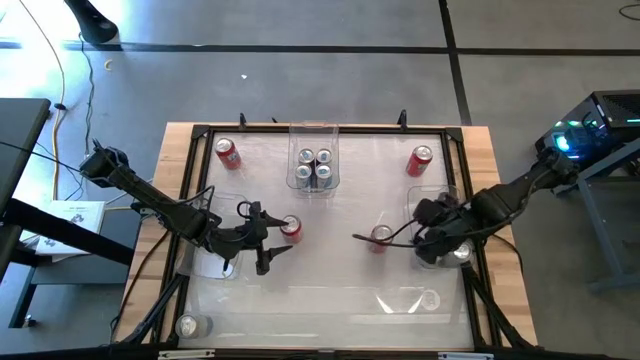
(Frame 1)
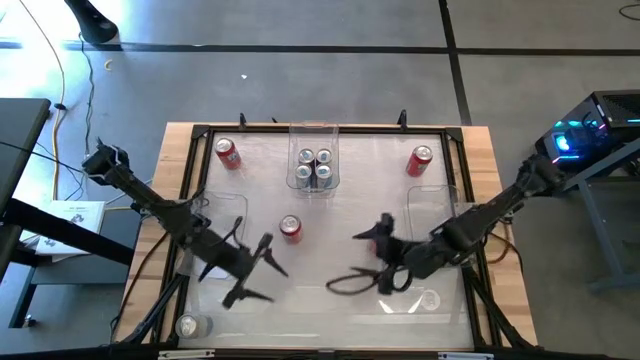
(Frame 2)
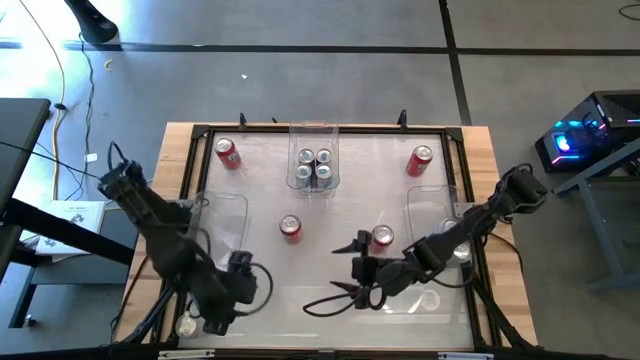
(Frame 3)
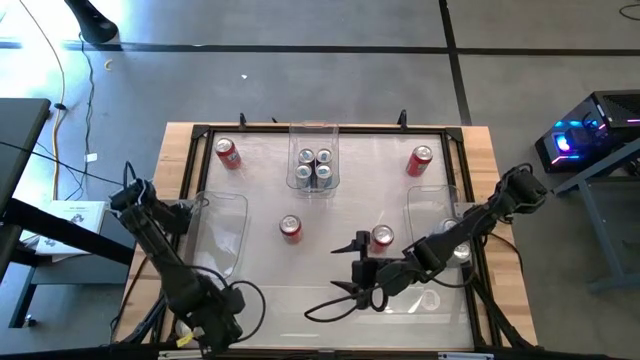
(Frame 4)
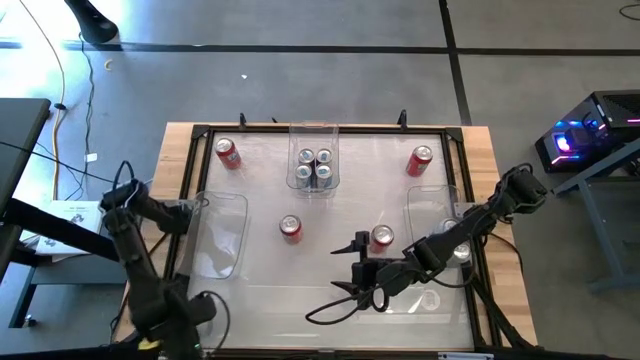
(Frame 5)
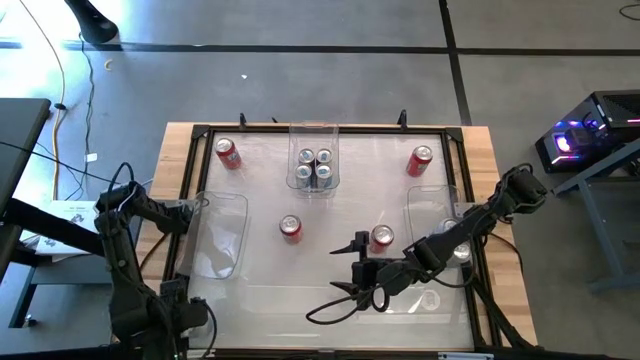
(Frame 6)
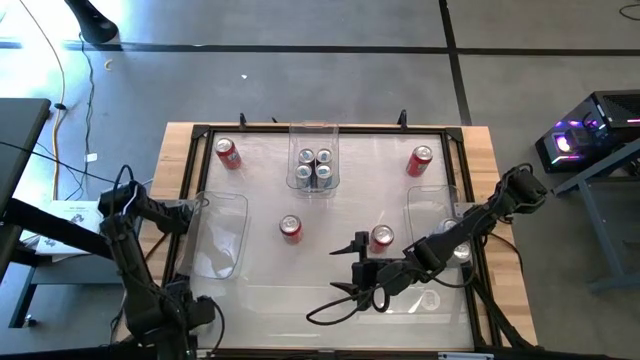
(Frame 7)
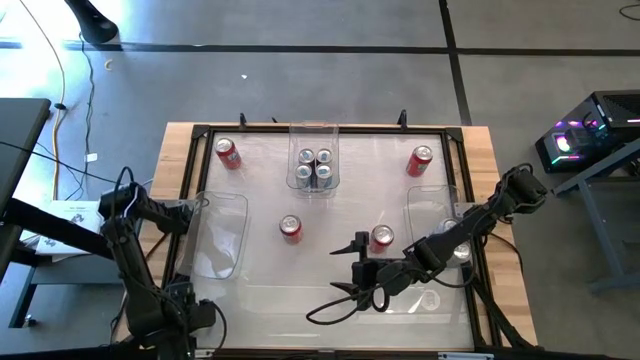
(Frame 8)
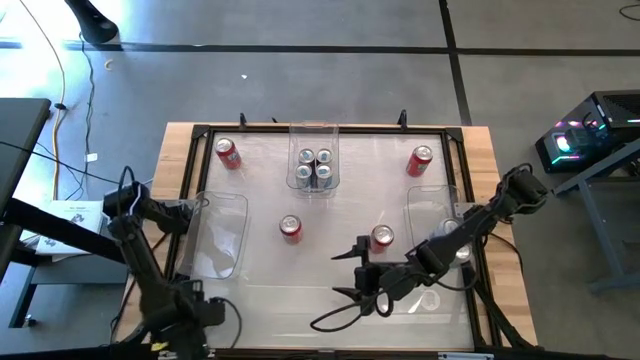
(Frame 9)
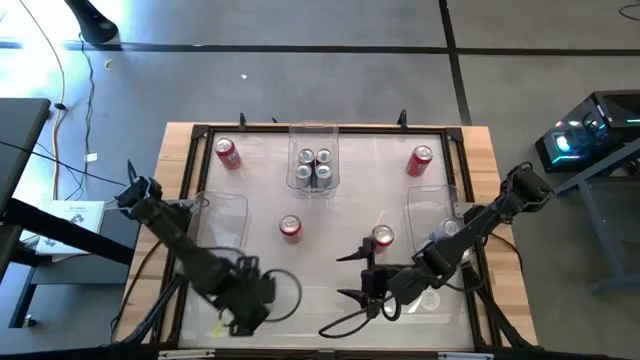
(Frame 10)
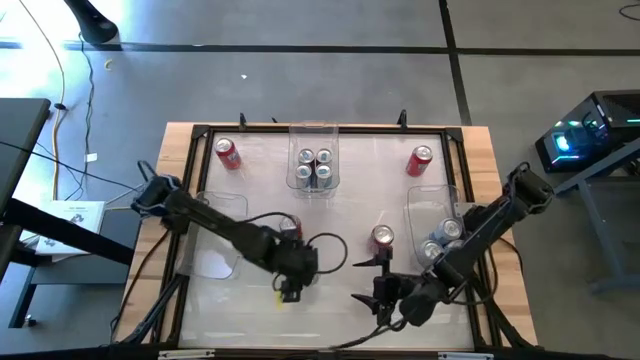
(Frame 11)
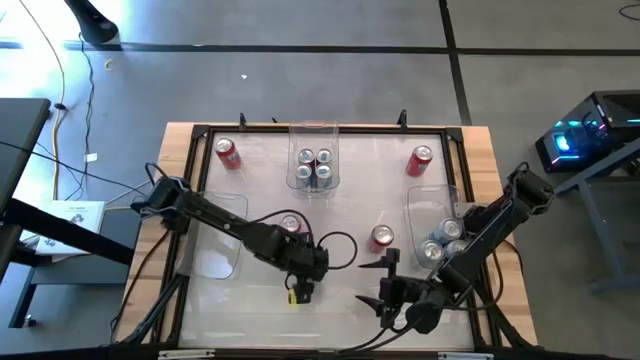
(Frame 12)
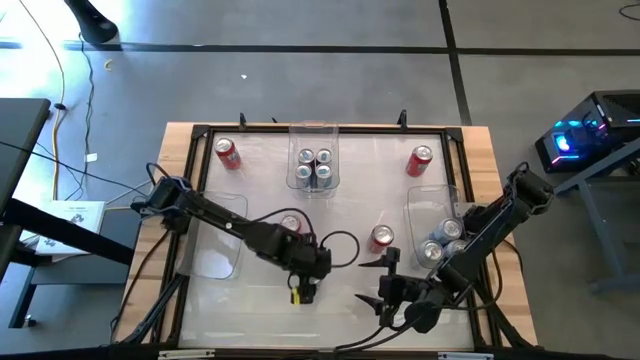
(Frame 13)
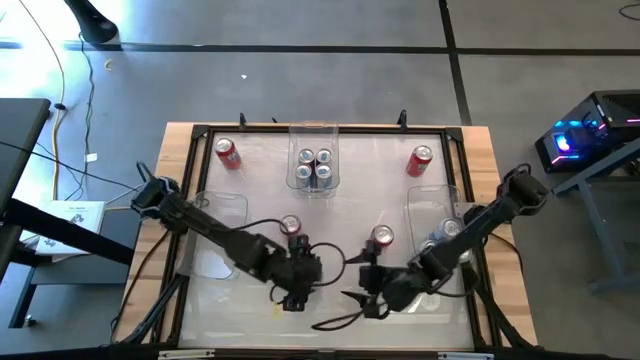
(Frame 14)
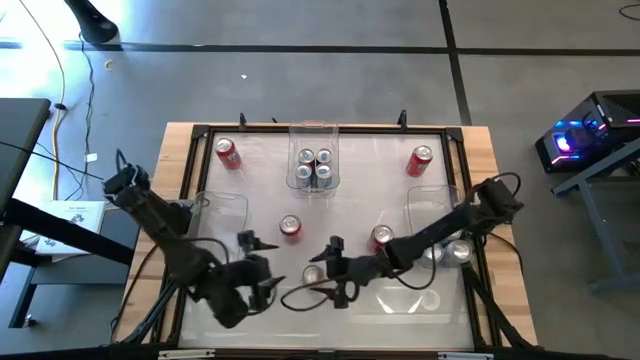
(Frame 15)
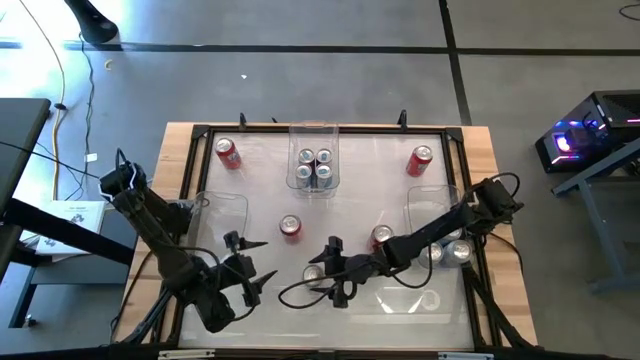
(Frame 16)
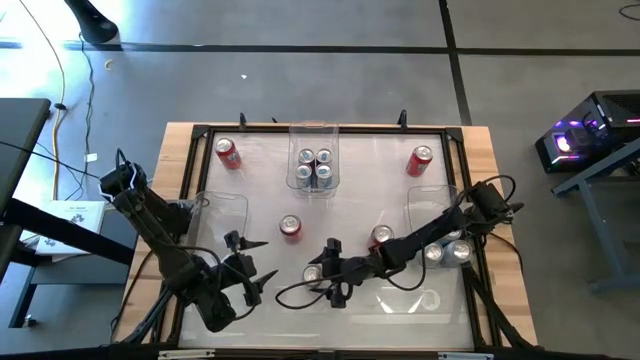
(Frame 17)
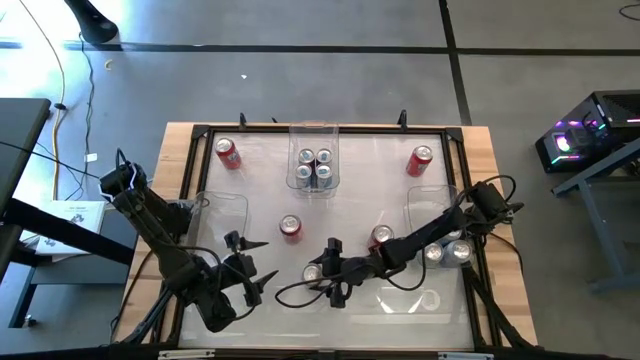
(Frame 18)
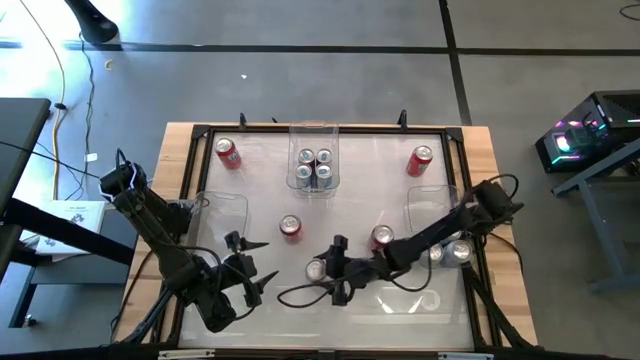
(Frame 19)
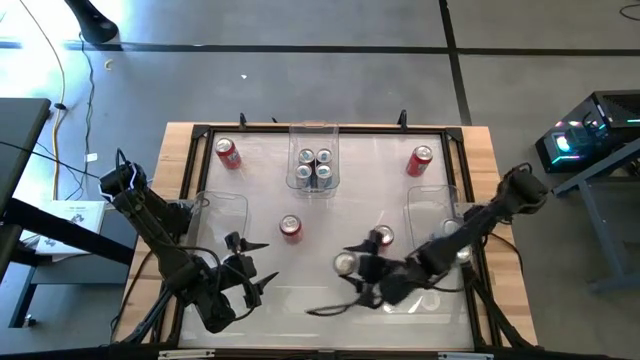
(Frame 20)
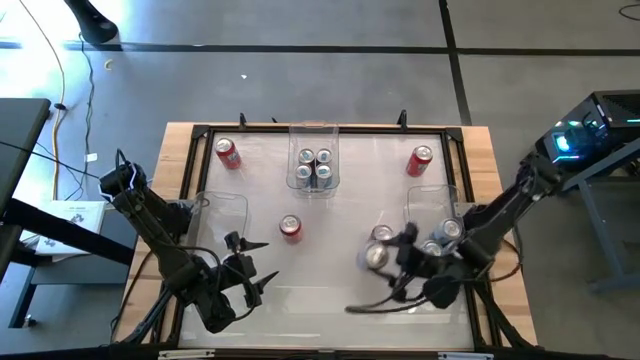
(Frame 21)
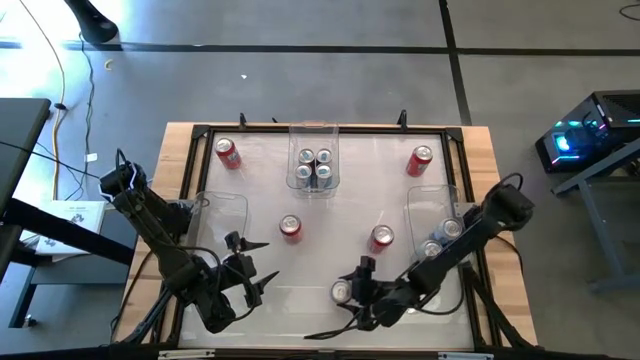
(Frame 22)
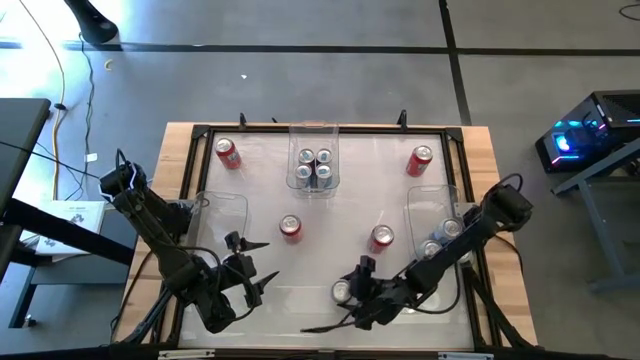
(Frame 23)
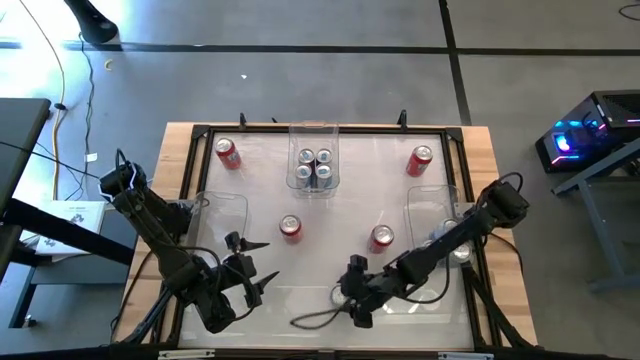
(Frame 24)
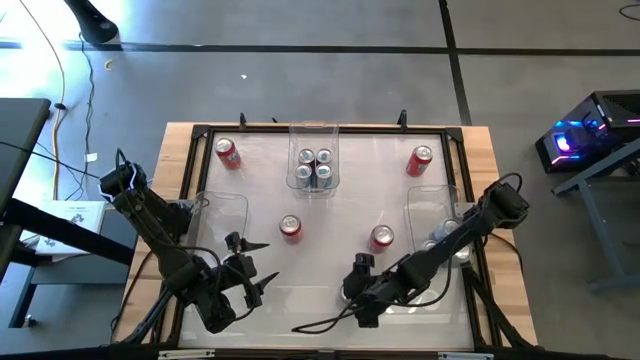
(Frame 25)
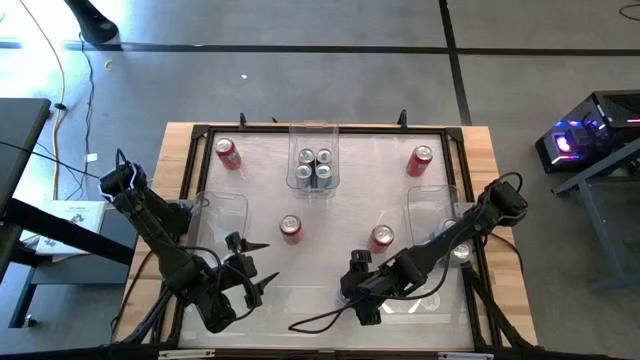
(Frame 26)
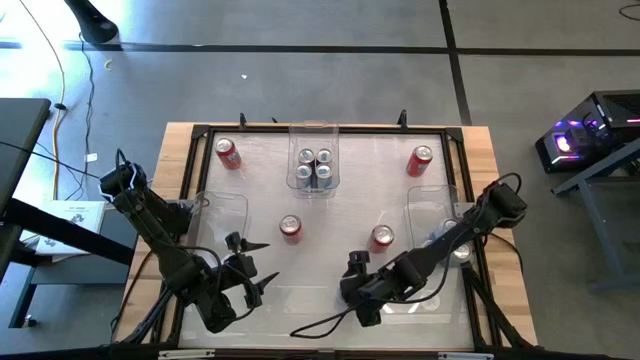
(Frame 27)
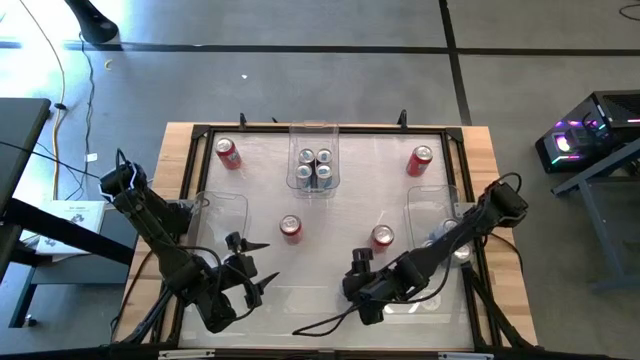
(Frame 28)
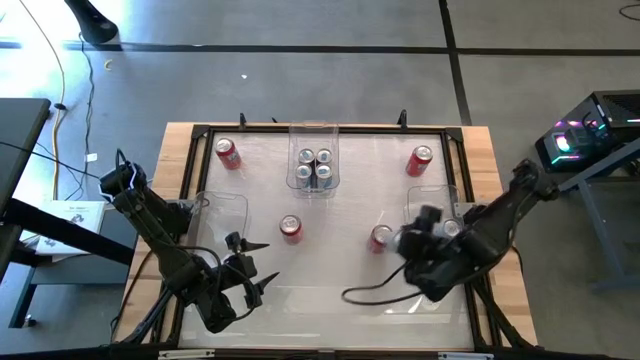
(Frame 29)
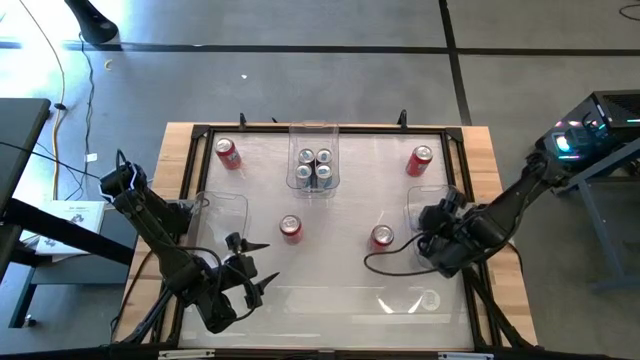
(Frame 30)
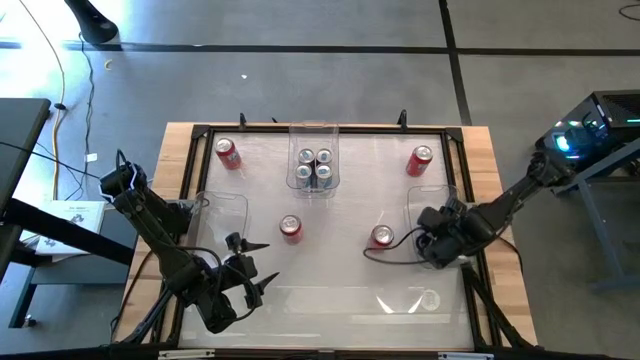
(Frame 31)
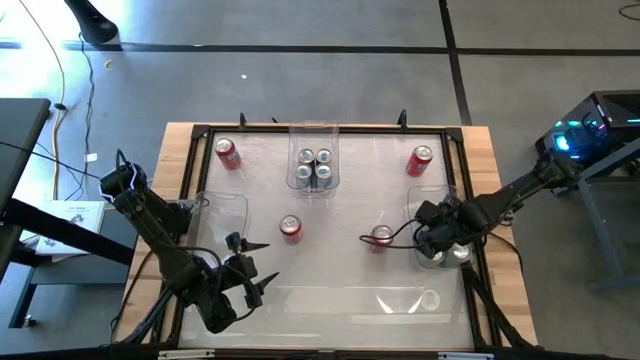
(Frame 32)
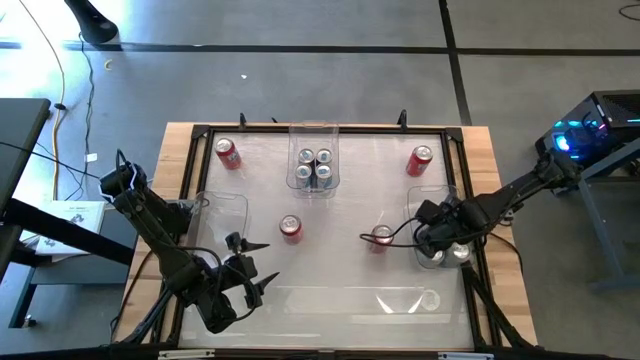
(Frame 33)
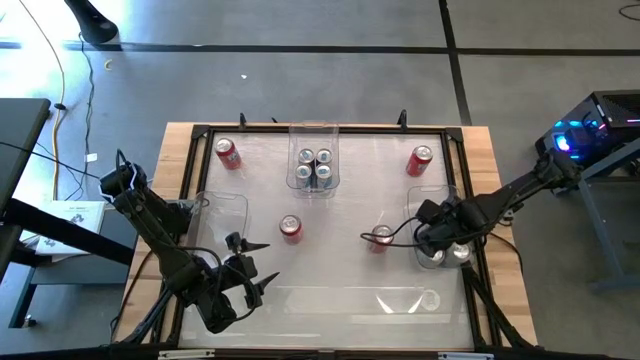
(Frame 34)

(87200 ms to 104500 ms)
Task: Sort soda cans
Put the blue white soda can into the bottom right transparent bin

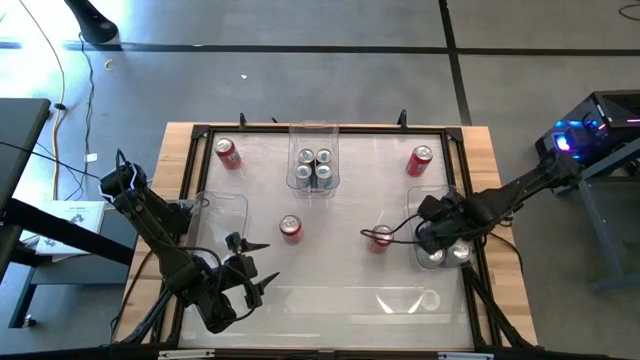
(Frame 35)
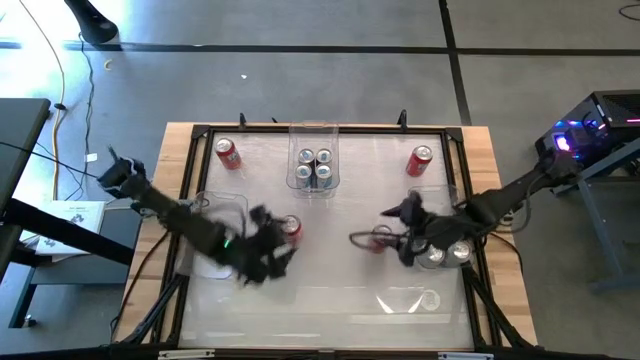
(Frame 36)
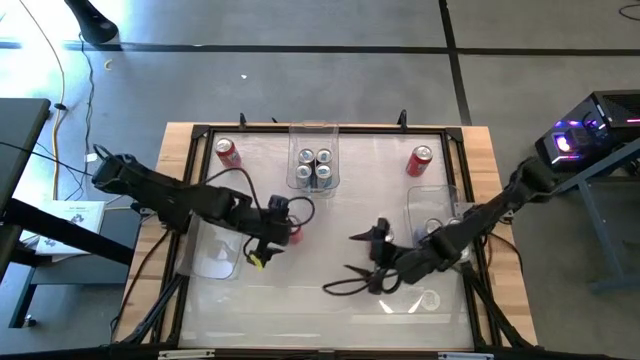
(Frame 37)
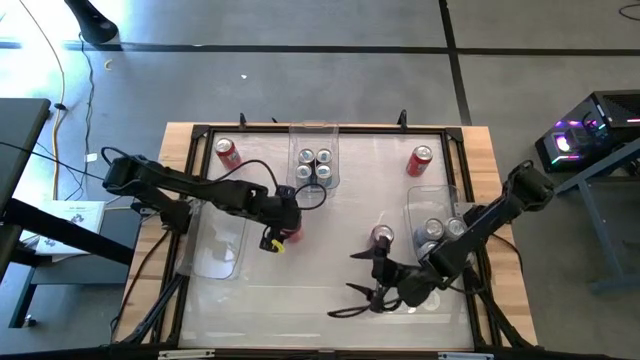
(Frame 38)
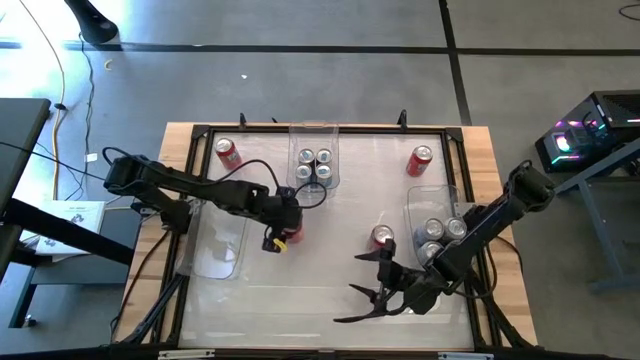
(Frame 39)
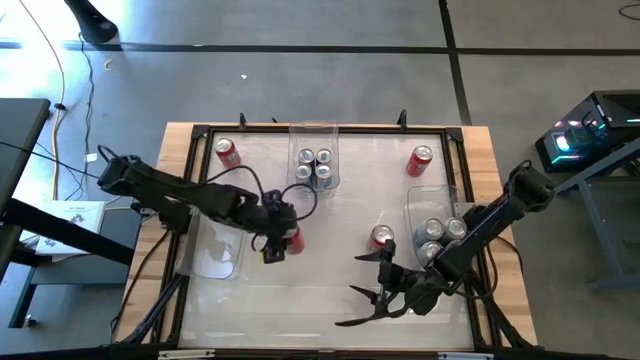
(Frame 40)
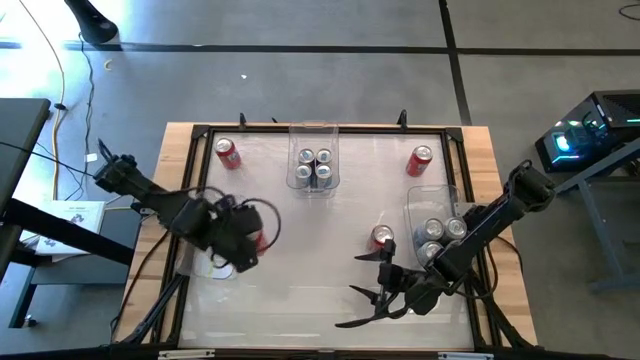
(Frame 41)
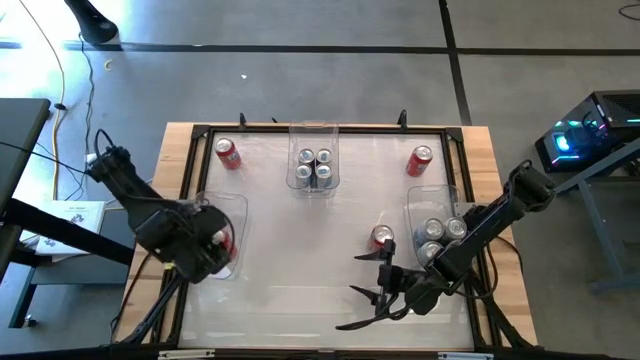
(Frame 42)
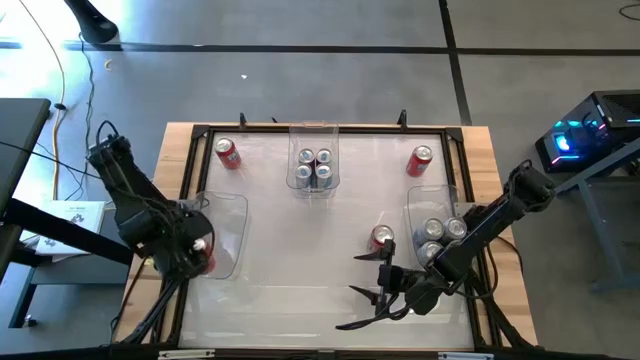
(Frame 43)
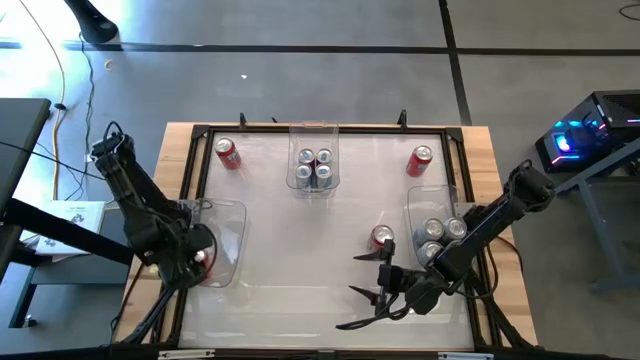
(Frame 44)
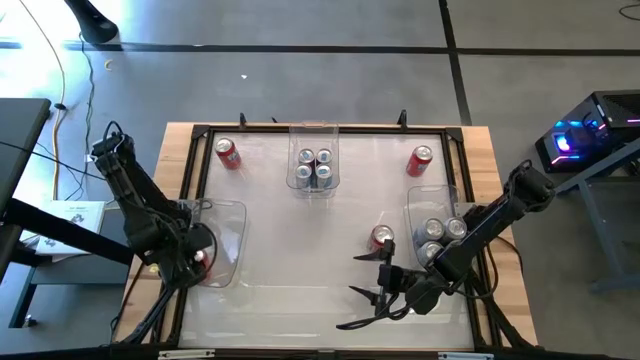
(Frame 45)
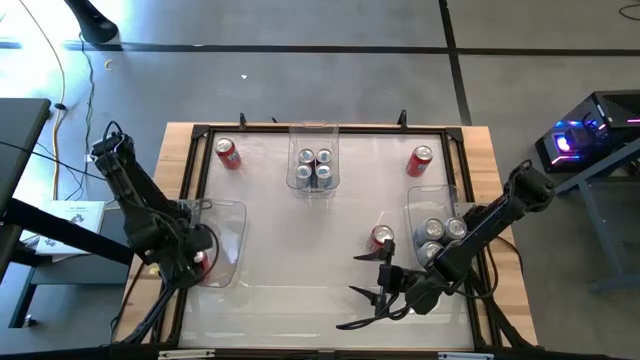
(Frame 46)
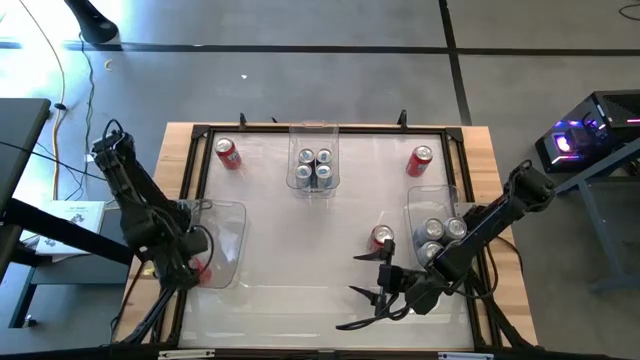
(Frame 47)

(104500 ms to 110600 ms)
Put the bottom left orange soda can into bottom left transparent bin
